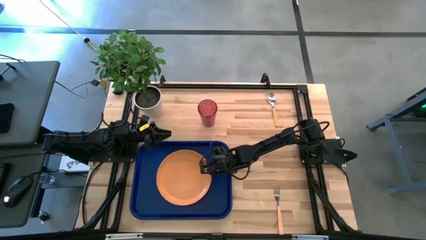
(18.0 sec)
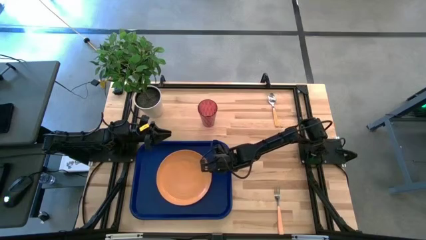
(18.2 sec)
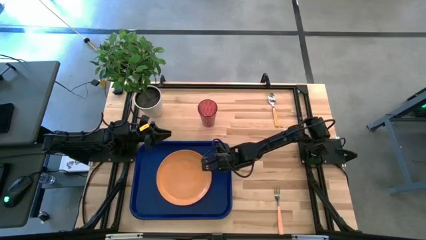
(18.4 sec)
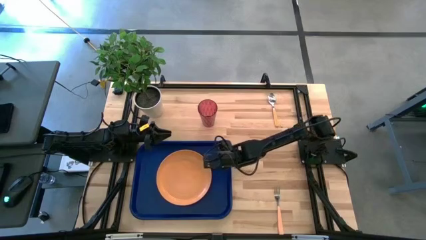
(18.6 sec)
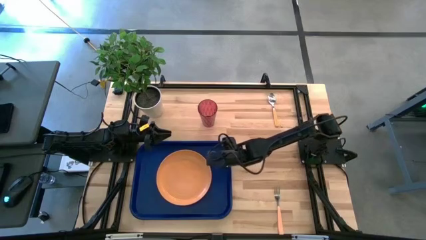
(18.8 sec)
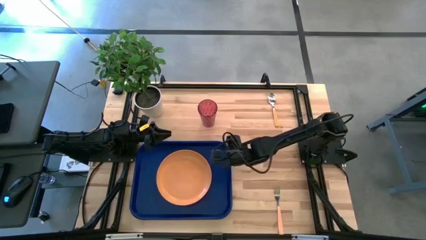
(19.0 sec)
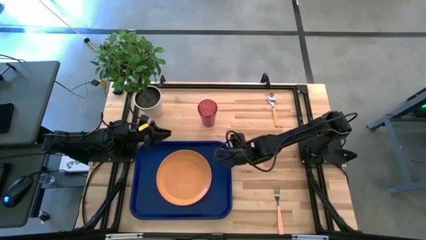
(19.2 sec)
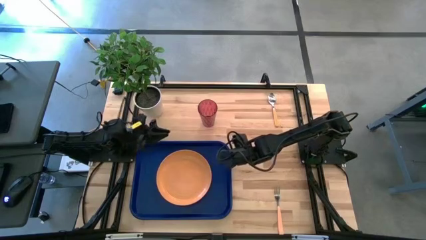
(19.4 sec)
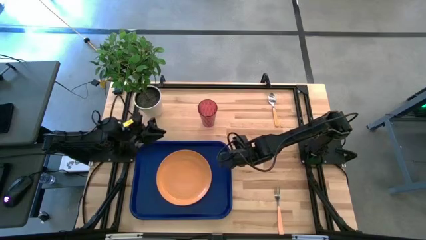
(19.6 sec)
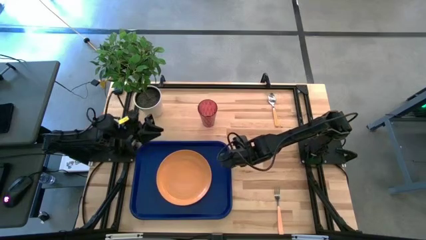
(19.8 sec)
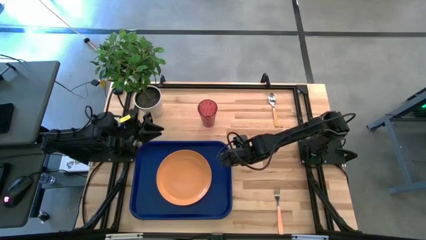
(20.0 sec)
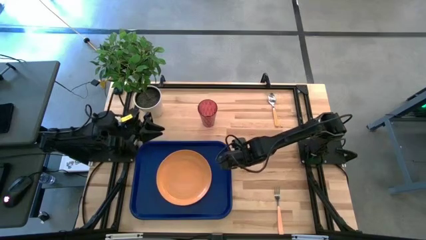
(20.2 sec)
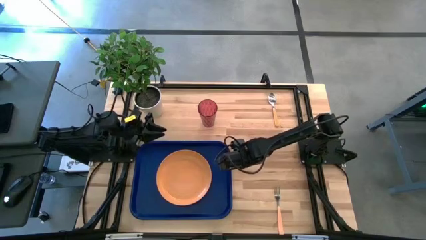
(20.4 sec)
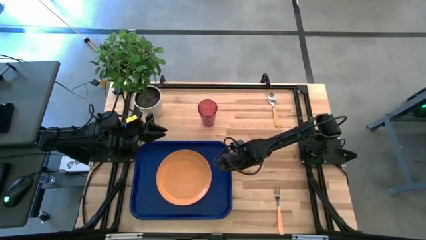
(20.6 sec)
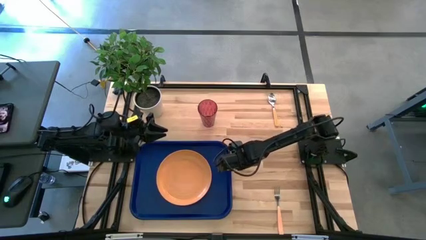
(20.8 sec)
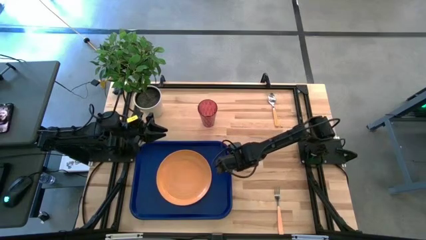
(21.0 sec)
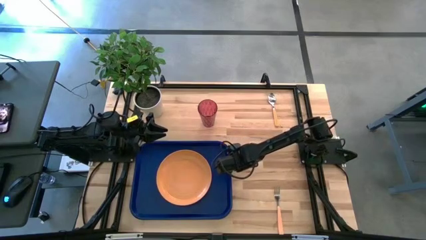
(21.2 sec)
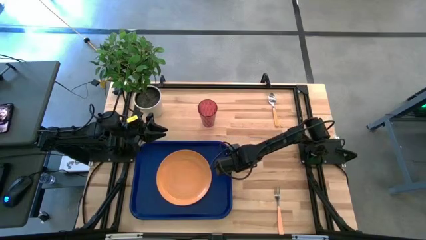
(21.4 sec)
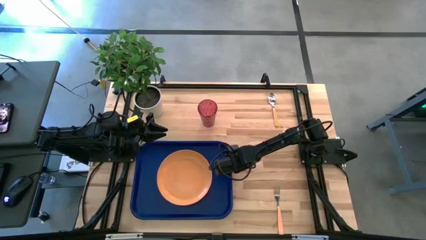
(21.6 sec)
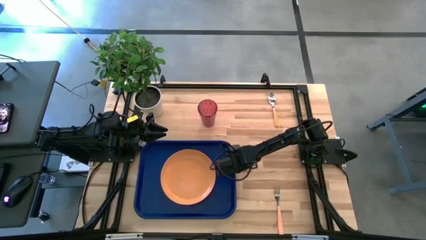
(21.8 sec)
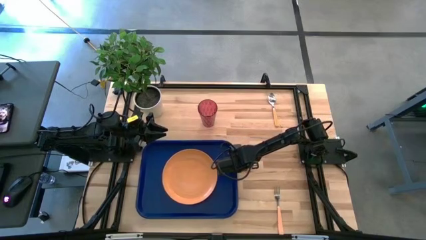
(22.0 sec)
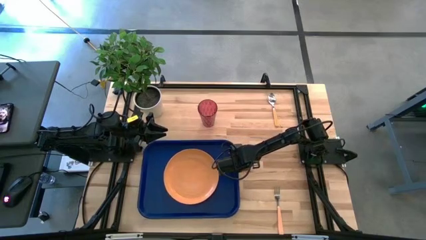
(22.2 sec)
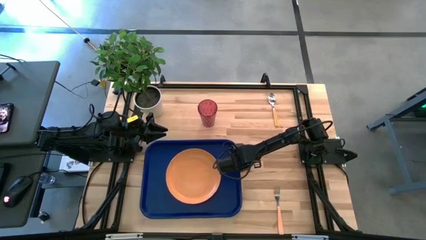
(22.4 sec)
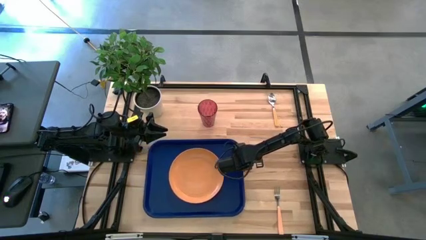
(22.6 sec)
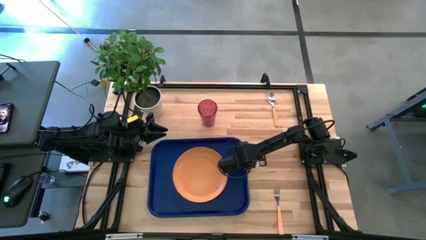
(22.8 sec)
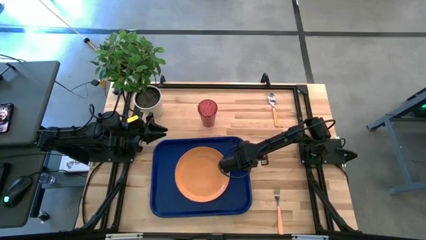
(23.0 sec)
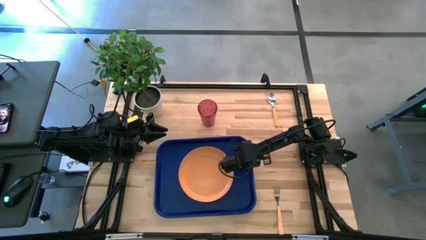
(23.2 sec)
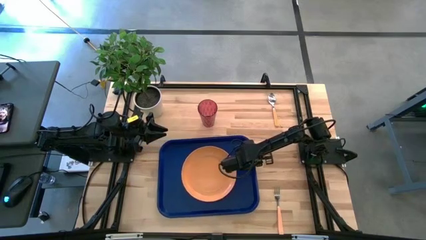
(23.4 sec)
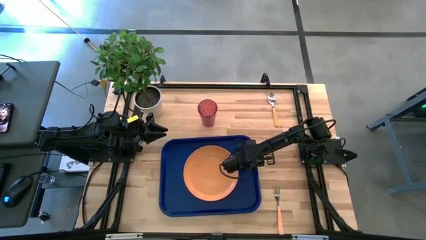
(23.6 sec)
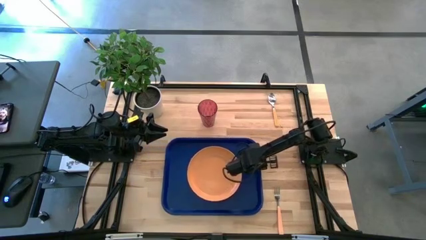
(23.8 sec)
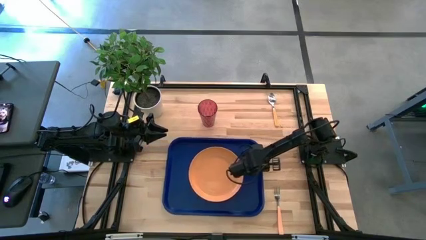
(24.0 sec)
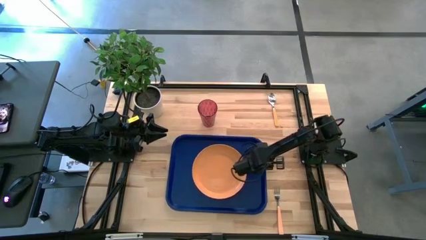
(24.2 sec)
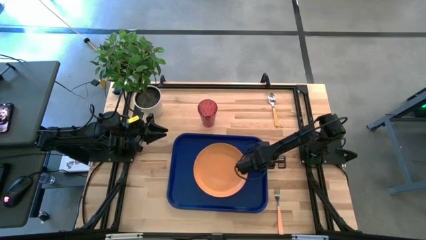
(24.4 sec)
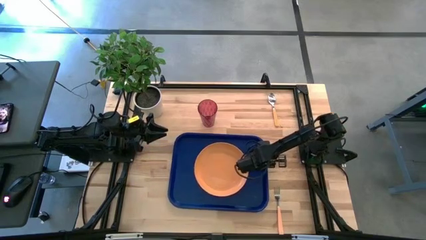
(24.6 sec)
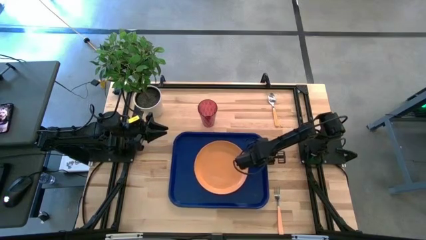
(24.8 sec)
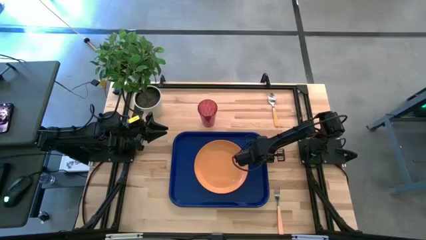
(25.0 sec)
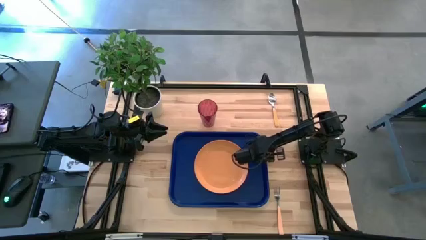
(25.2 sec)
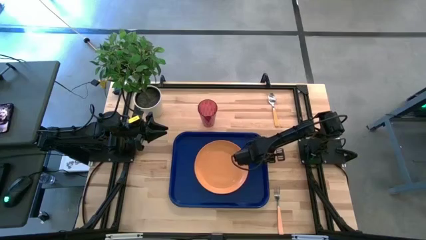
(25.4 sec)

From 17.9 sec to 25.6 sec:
Task: Pick and place plate/cup/fork/spoon on tray
Move the blue tray to the center of the table

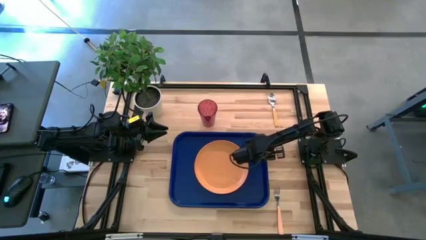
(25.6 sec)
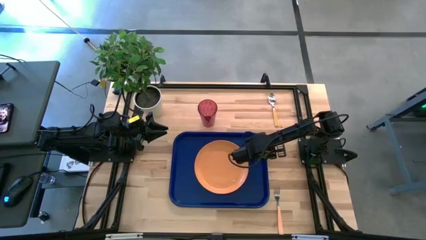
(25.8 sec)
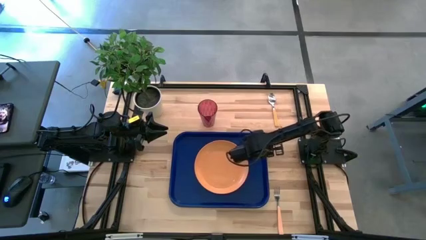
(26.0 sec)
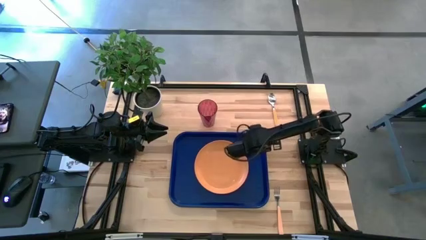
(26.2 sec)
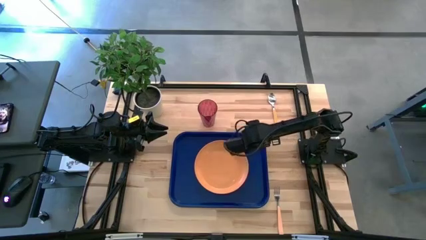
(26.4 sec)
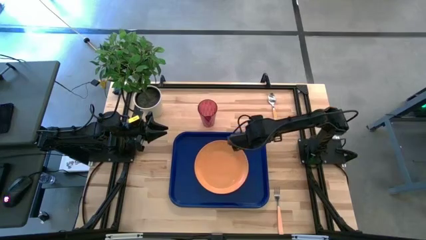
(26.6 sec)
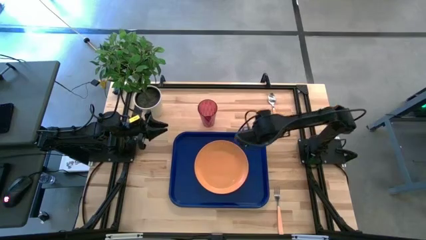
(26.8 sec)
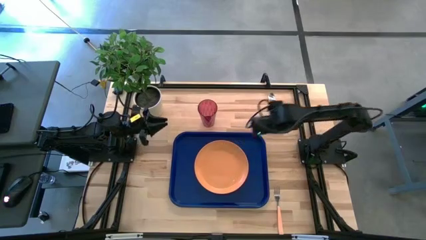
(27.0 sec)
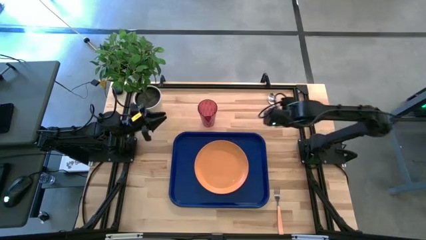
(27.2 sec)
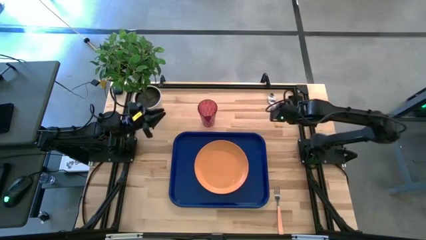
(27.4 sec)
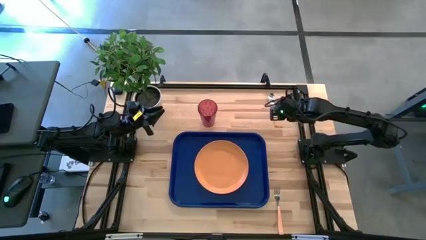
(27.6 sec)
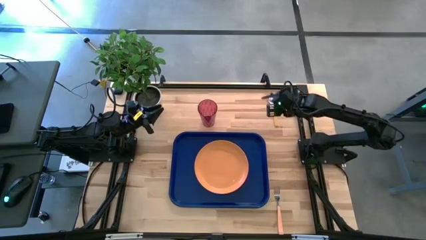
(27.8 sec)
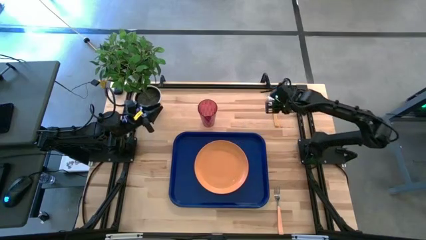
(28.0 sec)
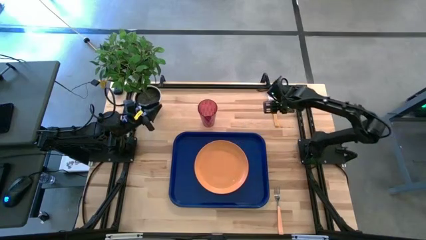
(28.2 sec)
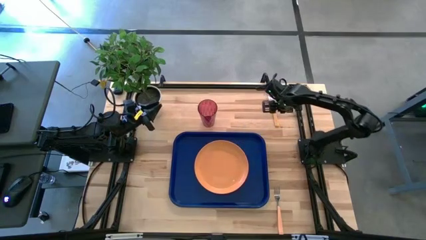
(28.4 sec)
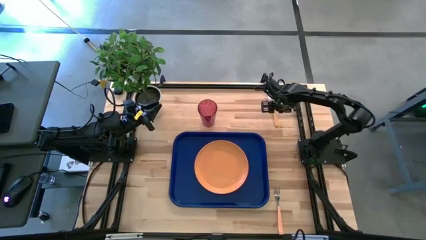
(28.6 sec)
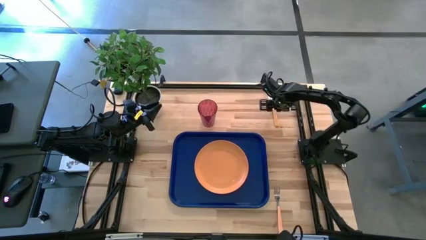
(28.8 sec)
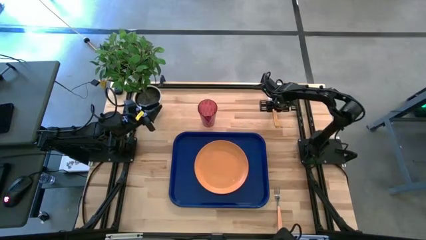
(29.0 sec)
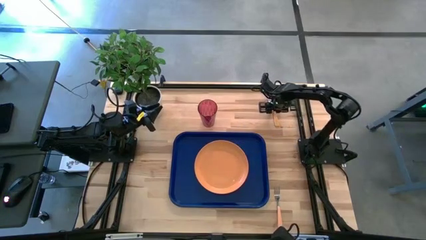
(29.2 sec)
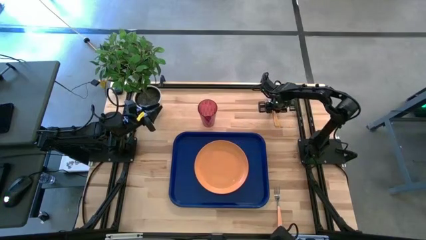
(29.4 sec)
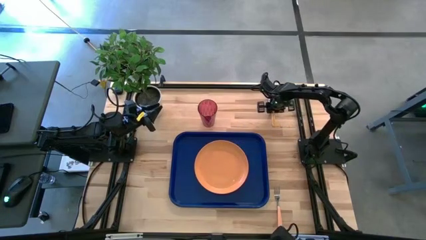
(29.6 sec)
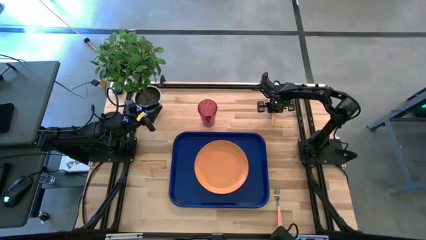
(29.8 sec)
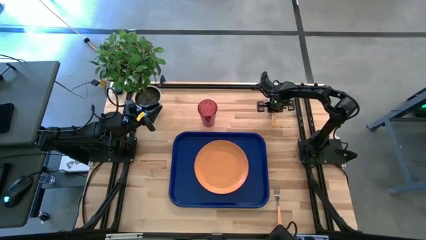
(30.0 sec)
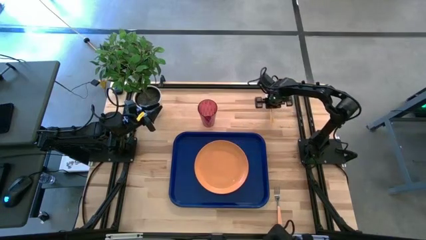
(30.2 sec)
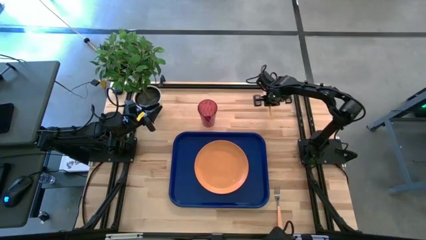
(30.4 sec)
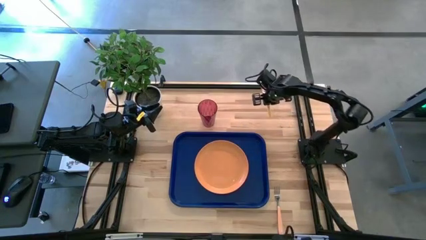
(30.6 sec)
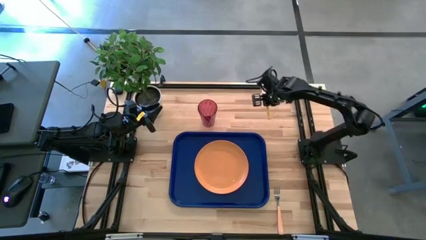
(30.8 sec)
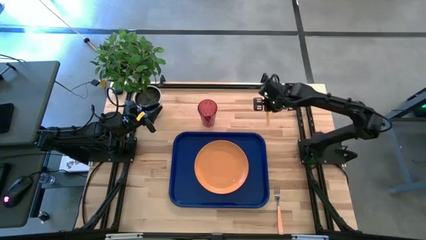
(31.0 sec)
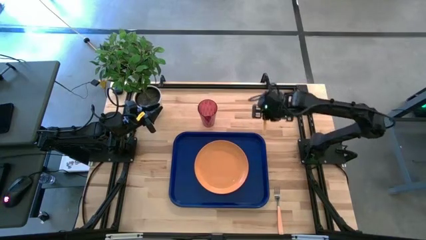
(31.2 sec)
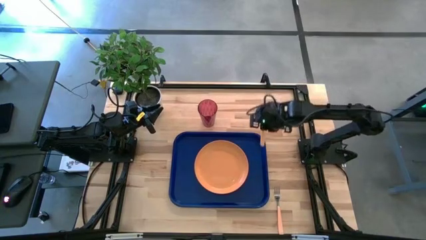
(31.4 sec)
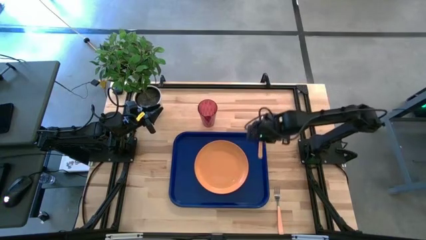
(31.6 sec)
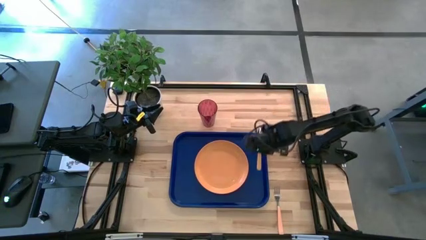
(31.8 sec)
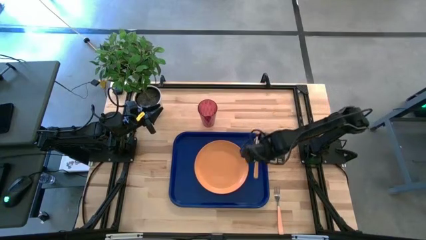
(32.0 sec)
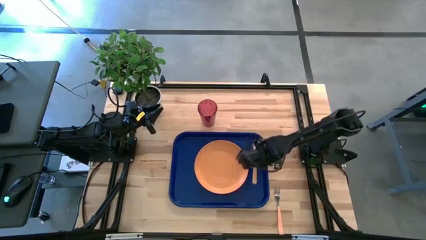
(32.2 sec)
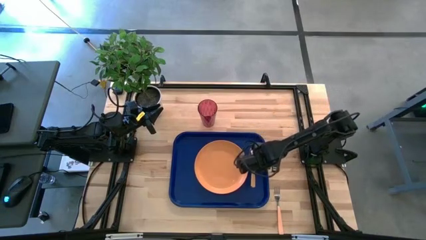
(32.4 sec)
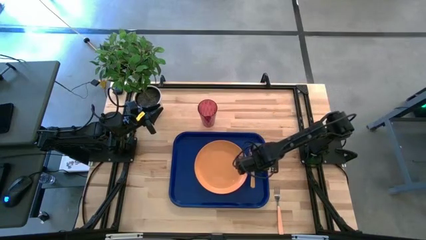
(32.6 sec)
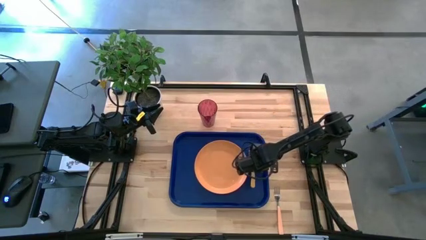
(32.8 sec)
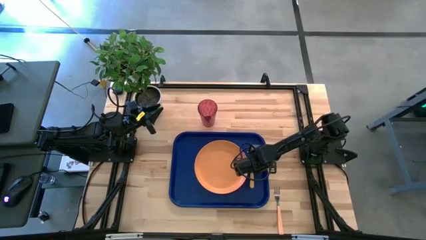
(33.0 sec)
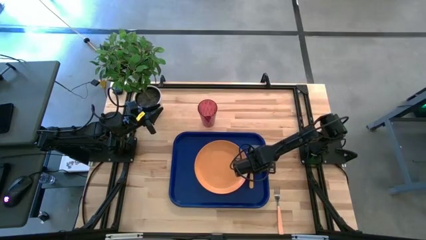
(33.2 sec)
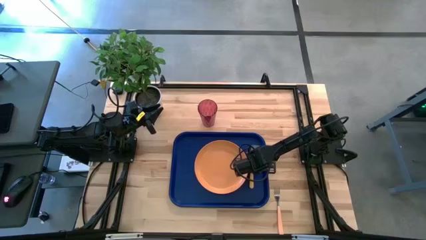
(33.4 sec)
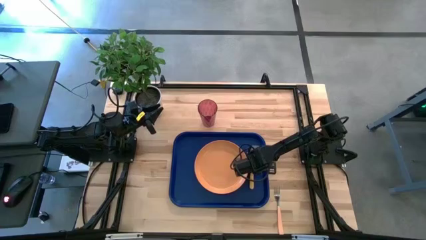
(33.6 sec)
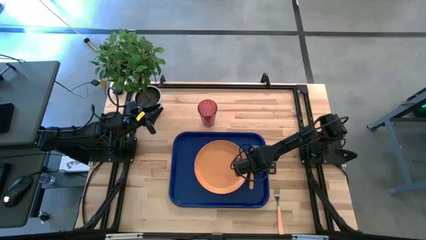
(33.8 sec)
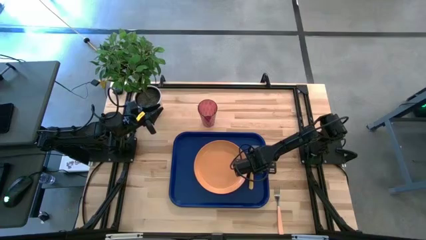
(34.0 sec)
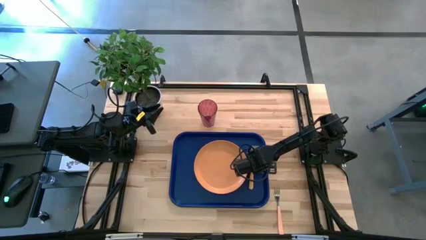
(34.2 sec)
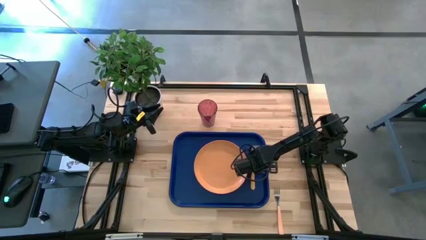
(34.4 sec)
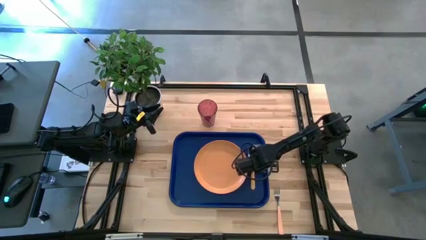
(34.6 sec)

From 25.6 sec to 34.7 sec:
Put the orange spoon on the right side of the orange plate
